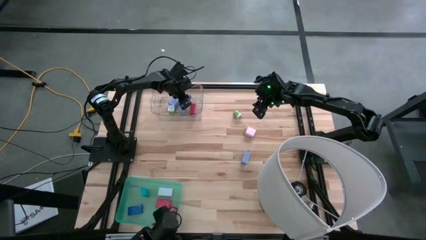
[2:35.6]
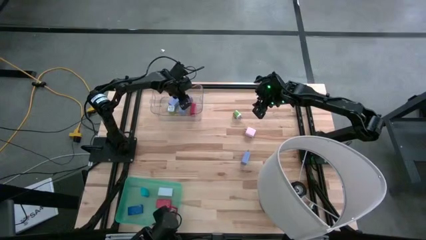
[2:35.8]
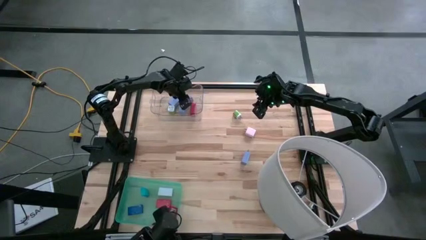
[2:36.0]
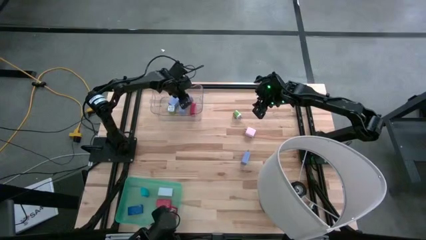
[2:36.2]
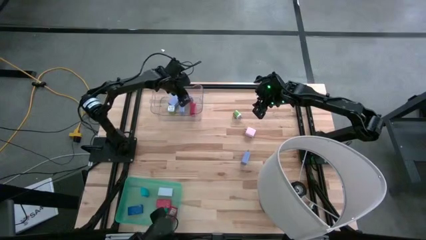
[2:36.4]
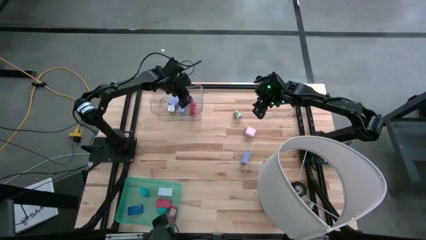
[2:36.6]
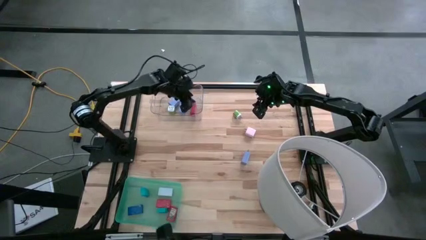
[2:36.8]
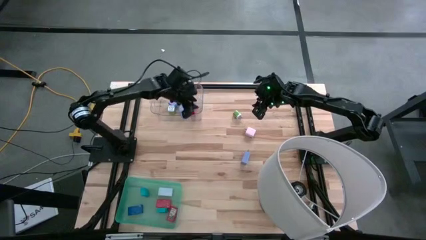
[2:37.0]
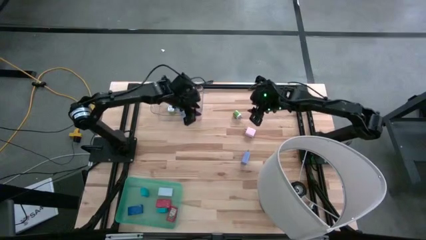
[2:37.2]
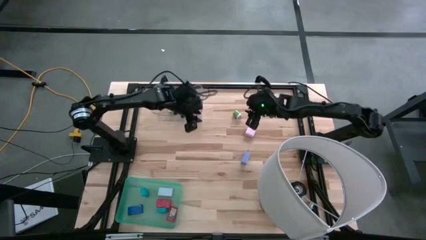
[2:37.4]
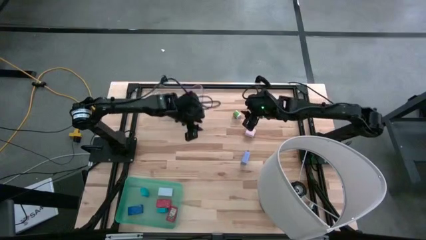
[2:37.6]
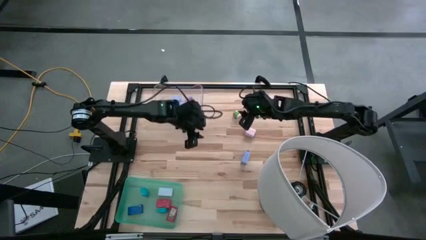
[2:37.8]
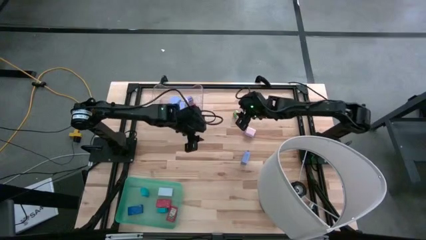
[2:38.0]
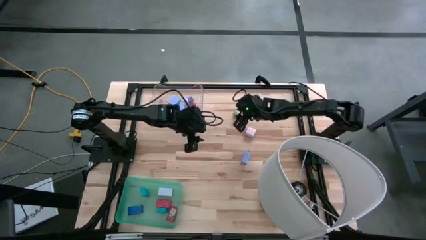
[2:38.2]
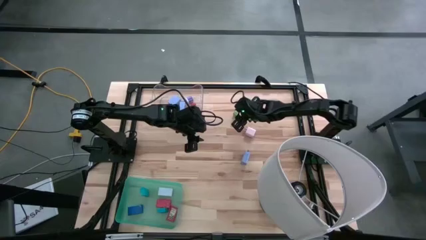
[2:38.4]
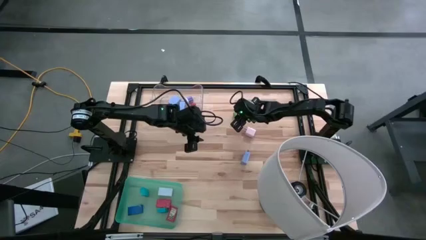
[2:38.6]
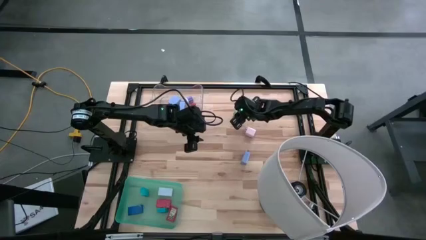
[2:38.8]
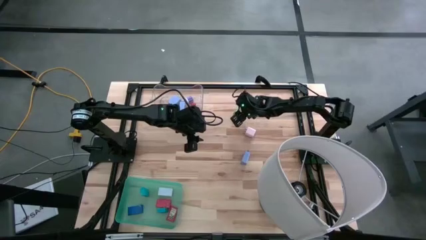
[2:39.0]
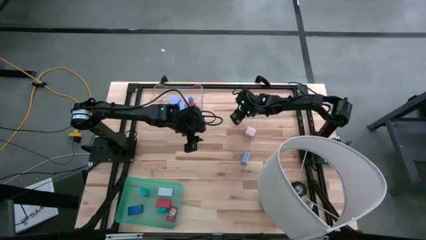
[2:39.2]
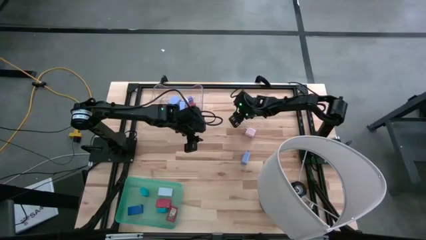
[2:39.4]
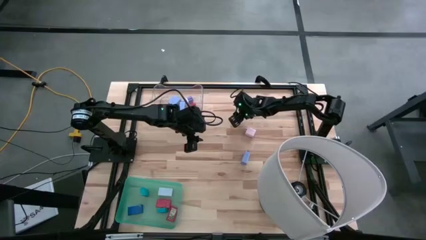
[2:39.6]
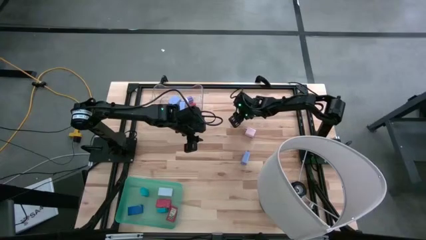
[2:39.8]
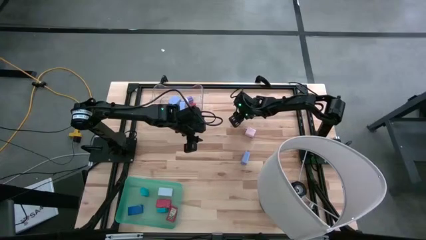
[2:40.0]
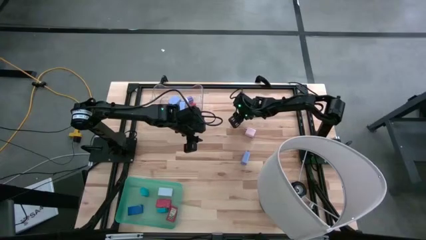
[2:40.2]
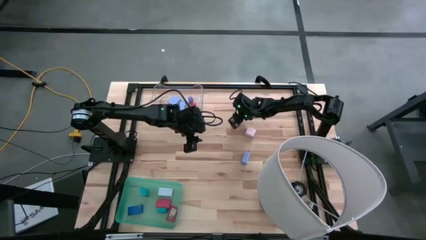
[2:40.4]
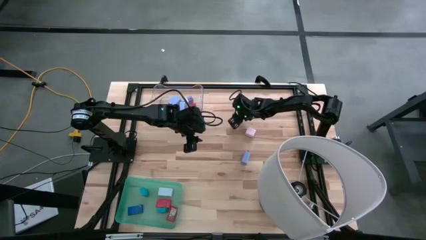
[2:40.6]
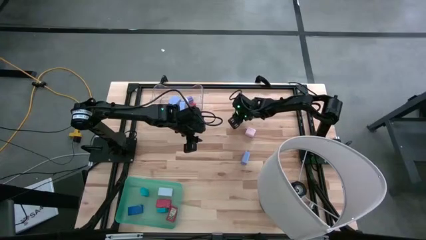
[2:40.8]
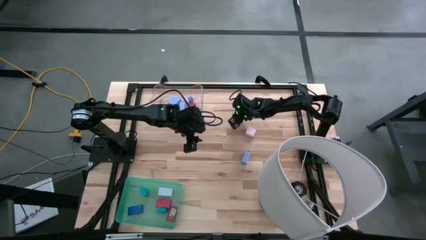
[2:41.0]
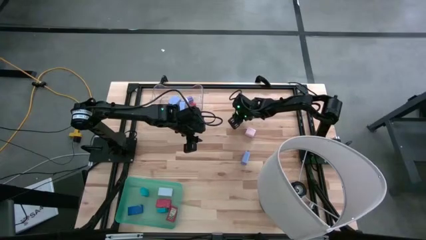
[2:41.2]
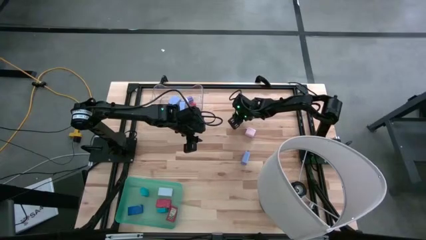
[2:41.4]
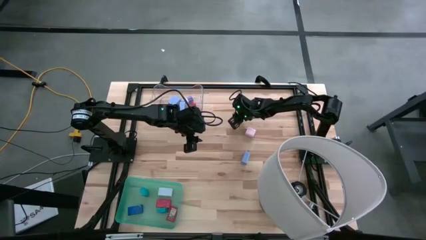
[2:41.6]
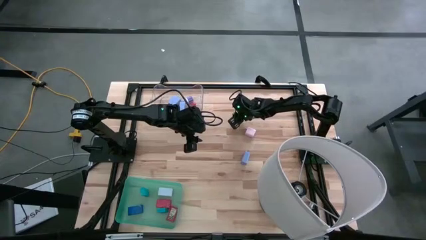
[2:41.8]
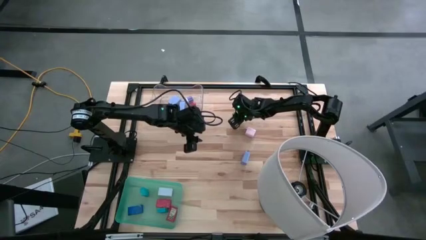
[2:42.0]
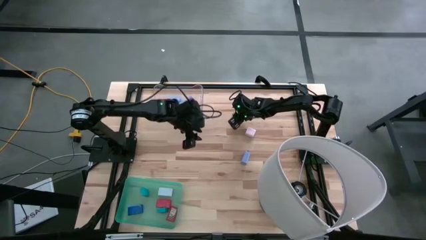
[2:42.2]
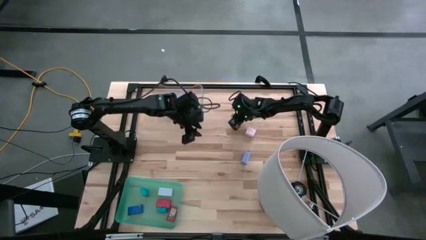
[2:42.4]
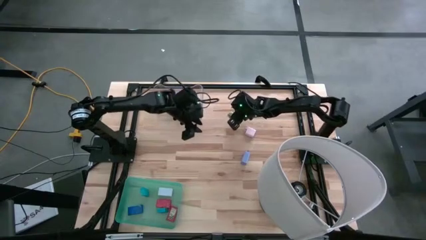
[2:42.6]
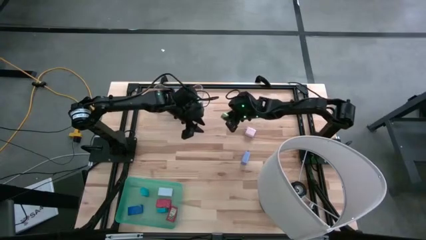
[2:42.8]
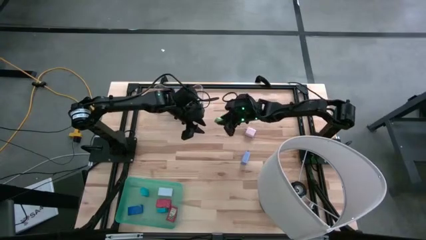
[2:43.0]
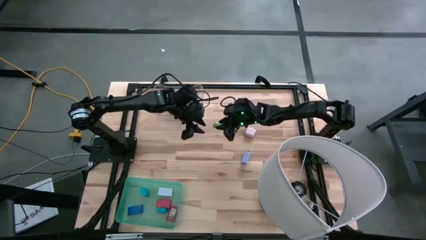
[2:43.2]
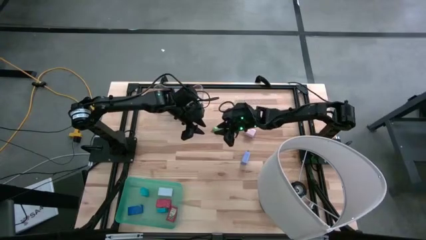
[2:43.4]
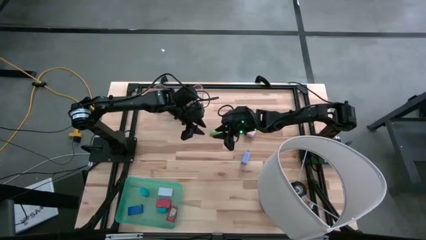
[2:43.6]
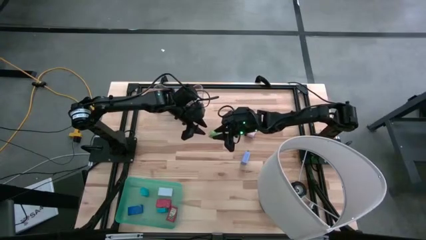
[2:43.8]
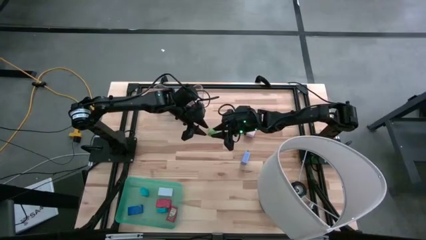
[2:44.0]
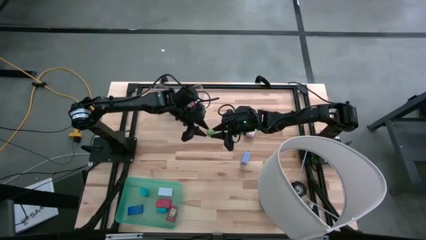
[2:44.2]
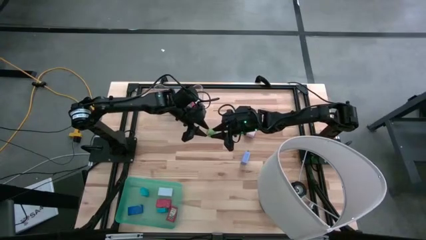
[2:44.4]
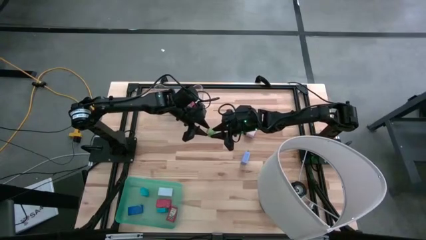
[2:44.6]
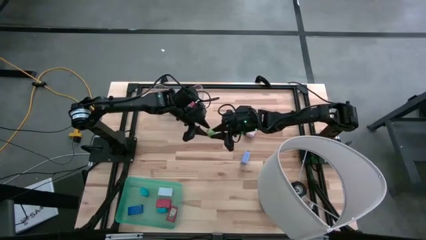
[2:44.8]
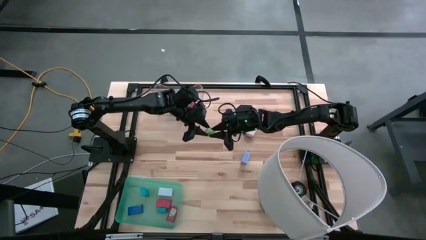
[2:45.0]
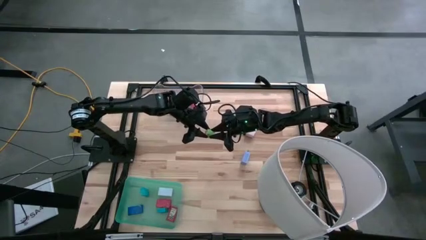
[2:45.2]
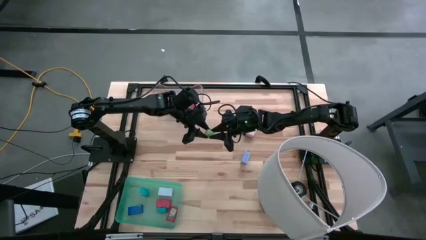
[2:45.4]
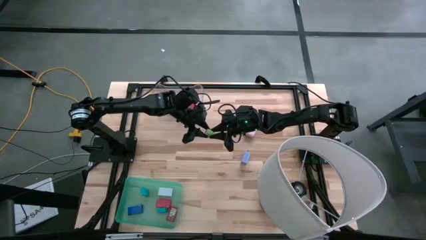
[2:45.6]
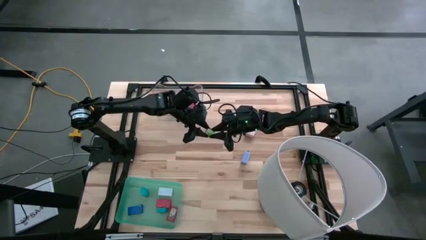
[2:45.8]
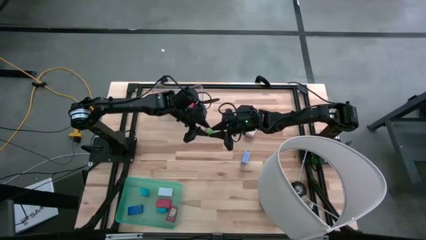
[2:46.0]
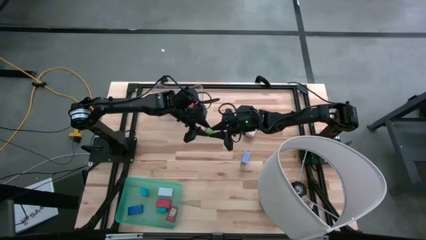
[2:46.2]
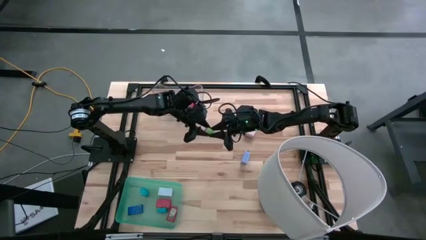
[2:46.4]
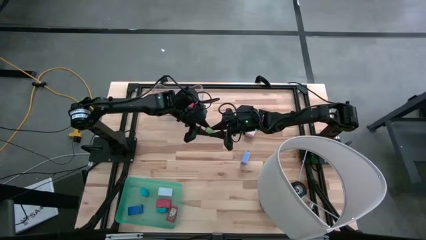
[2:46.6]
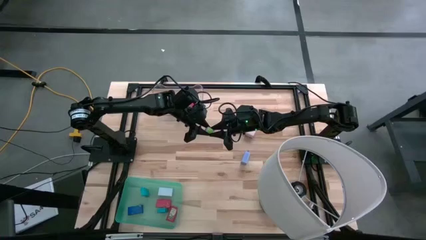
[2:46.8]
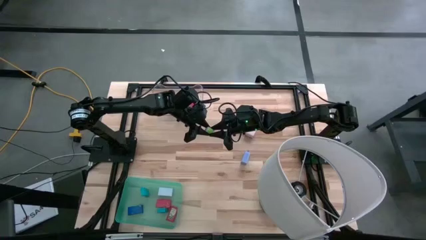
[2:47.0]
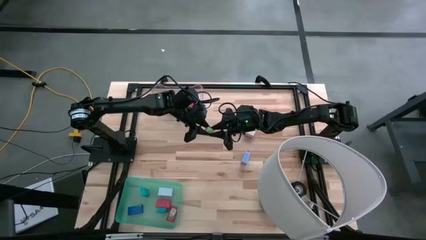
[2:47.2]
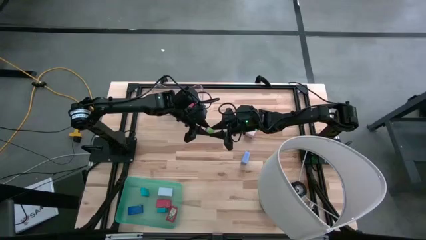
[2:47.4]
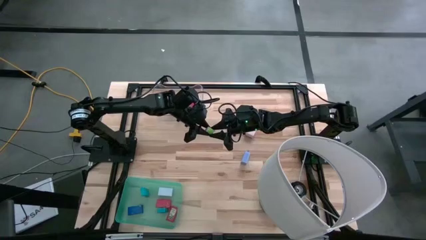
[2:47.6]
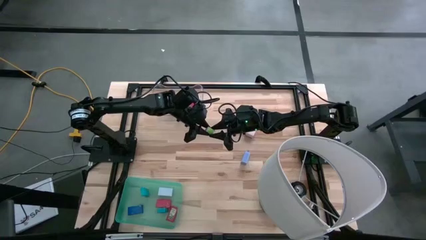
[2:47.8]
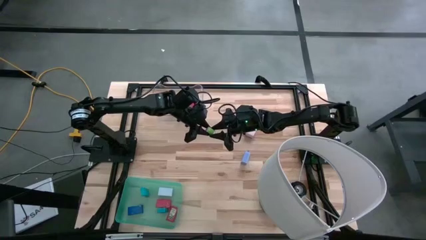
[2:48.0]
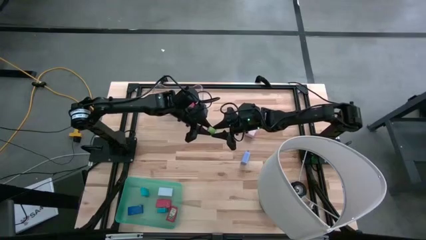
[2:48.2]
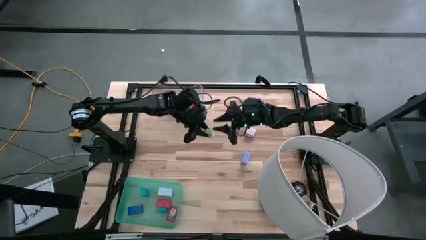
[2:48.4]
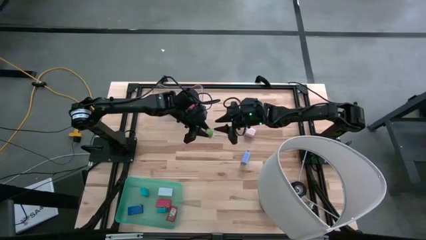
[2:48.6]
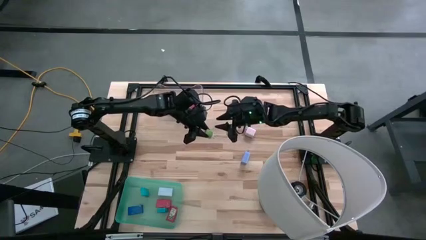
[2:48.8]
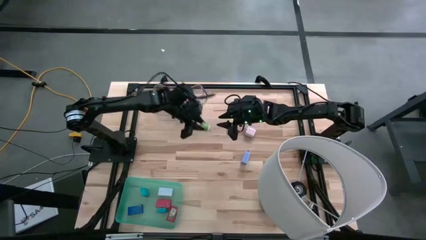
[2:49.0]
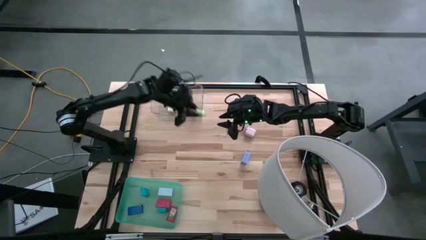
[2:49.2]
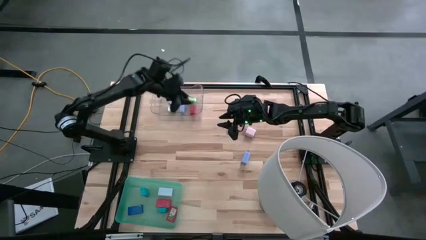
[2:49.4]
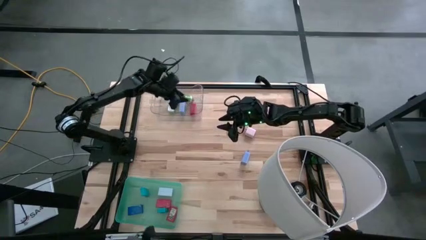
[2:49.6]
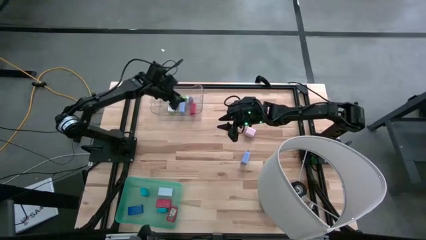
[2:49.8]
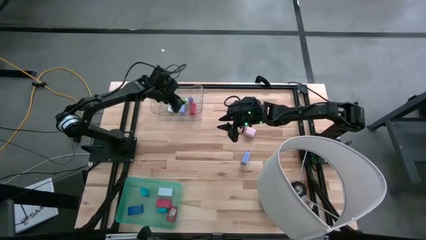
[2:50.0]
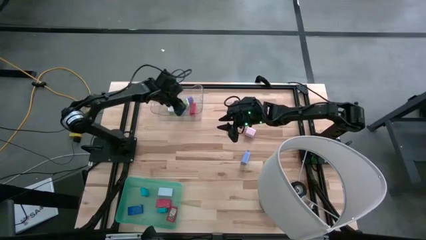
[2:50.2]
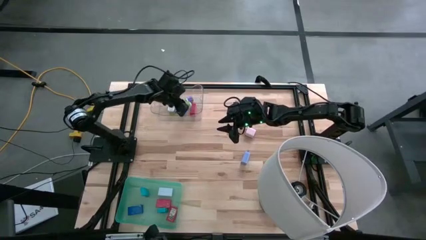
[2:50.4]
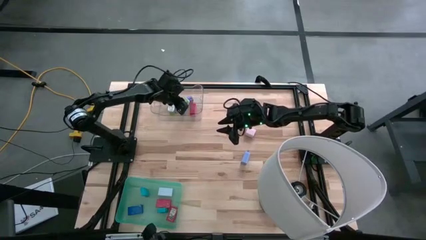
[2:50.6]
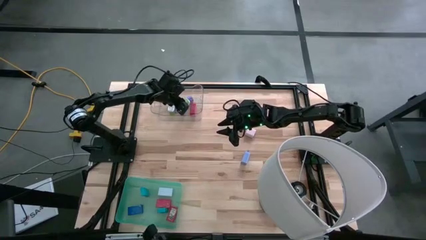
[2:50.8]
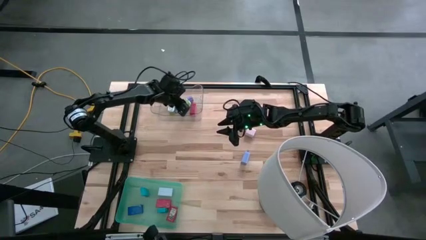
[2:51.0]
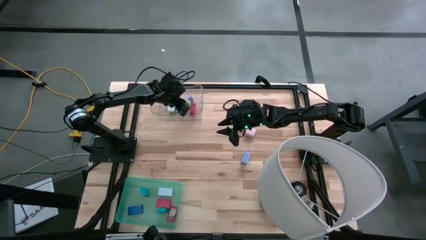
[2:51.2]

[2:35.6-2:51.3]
Task: Pick & Place Office items
Put the green charger adapter into the transparent bin
